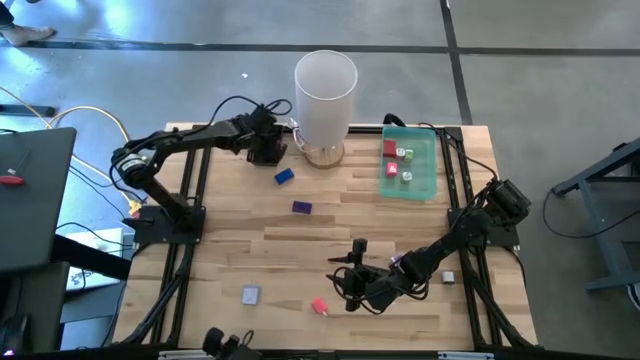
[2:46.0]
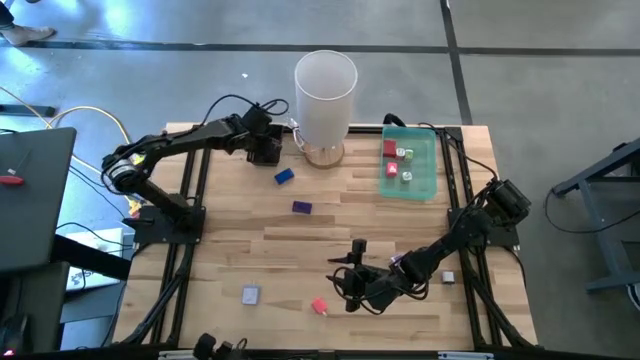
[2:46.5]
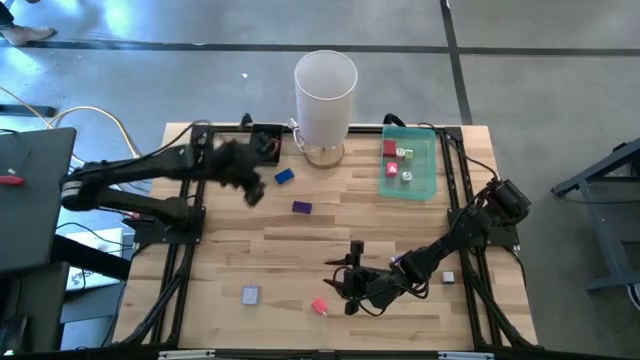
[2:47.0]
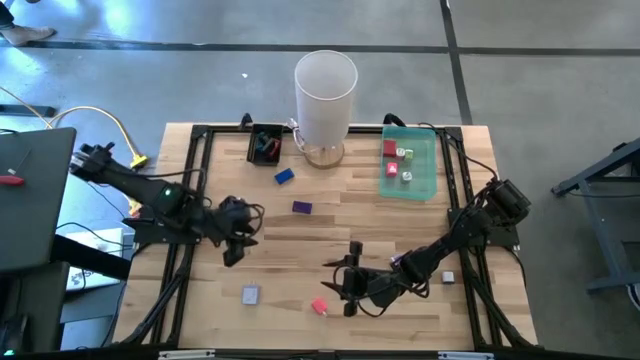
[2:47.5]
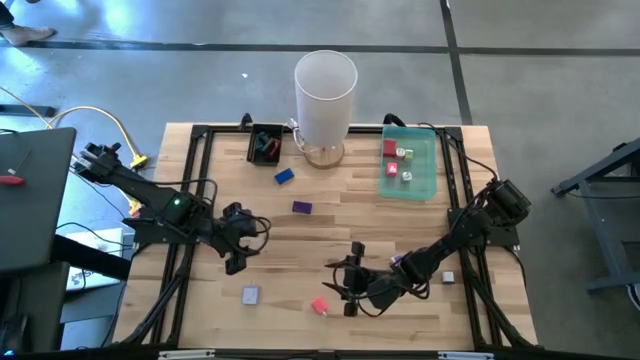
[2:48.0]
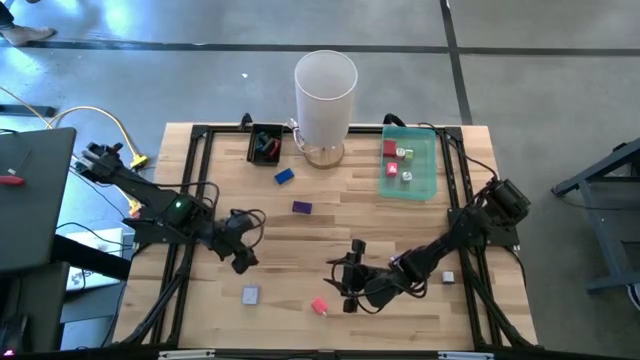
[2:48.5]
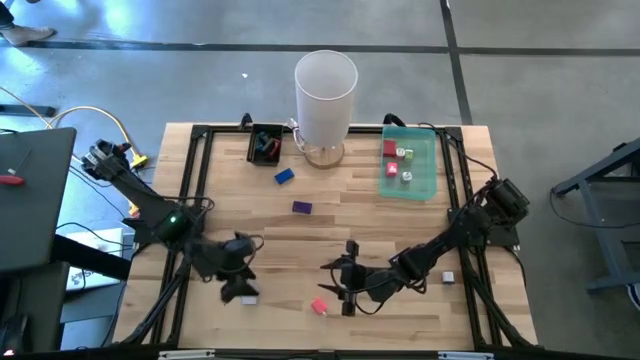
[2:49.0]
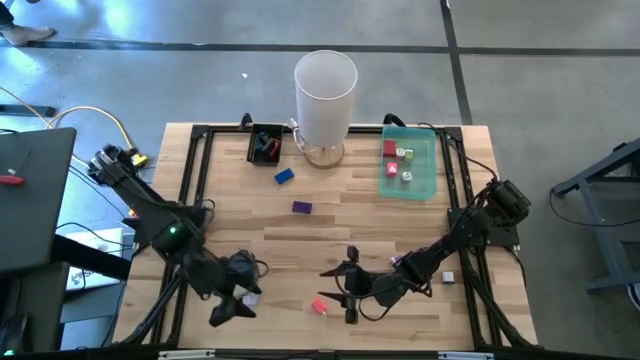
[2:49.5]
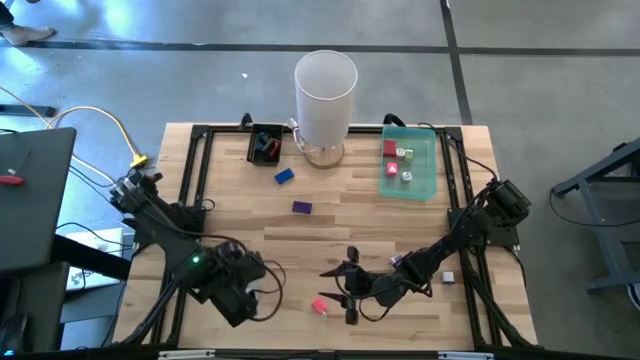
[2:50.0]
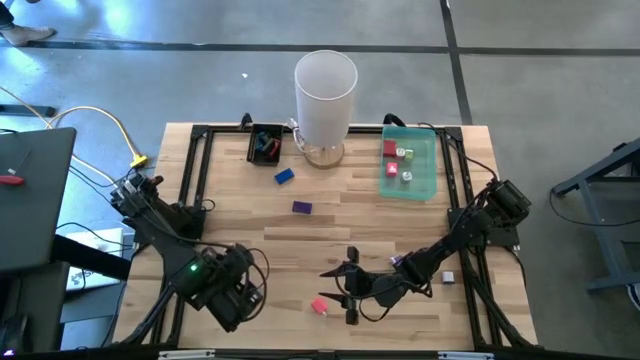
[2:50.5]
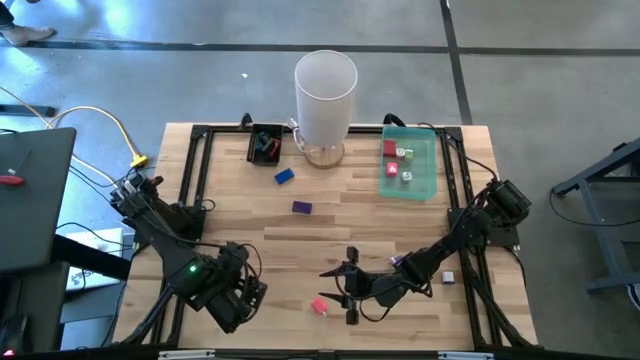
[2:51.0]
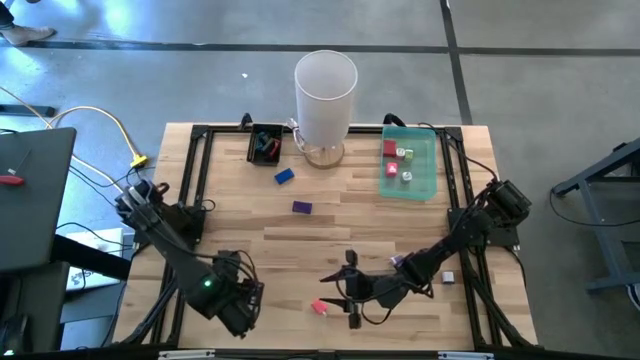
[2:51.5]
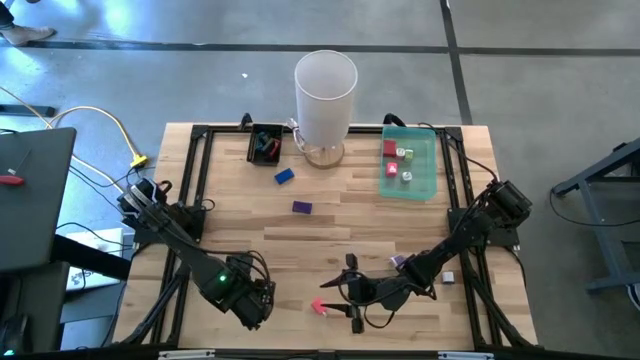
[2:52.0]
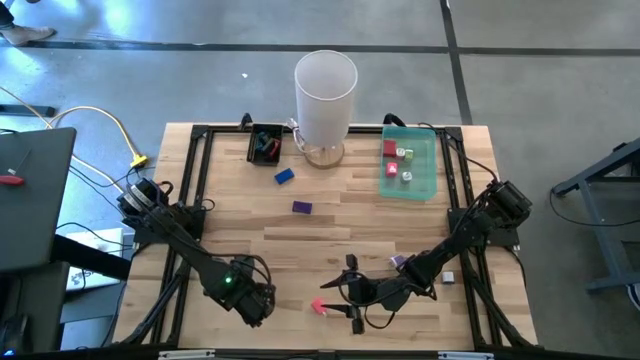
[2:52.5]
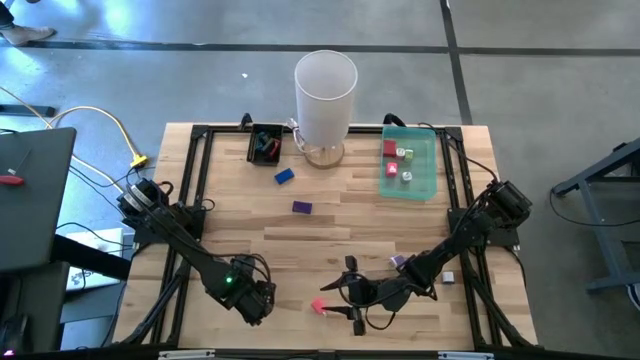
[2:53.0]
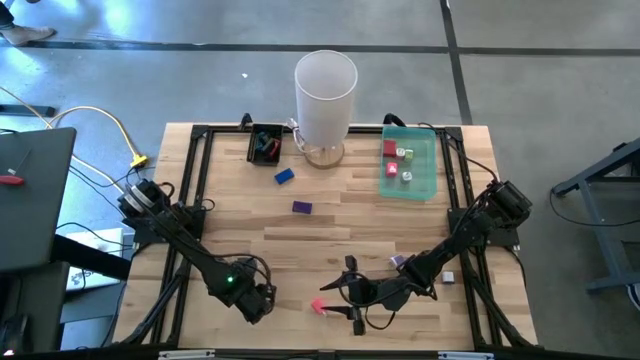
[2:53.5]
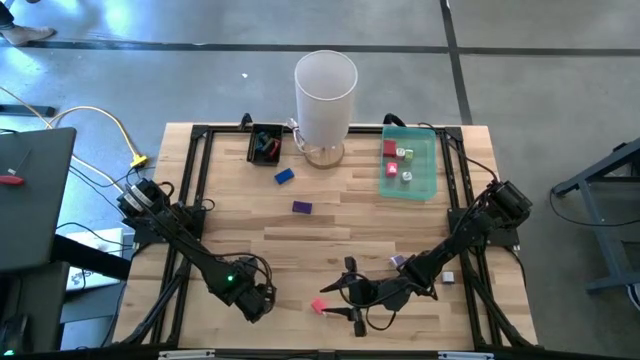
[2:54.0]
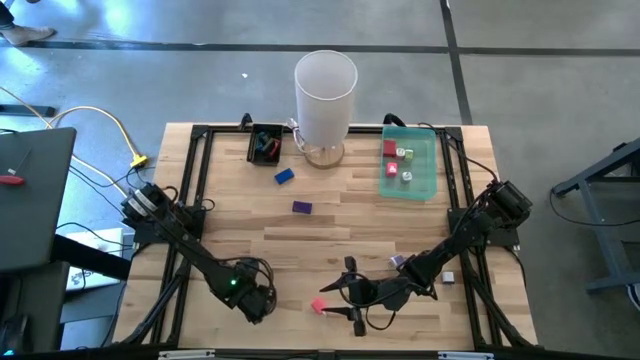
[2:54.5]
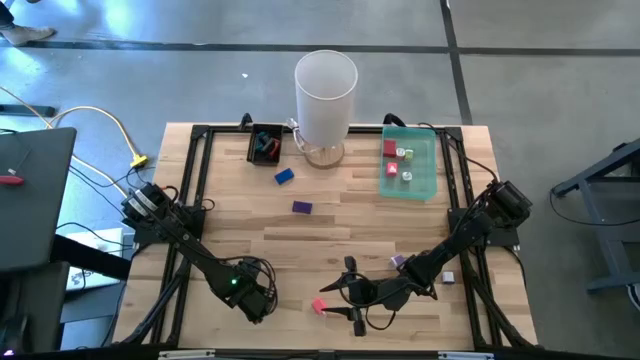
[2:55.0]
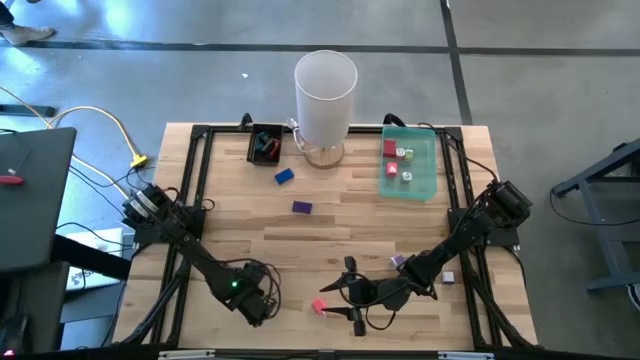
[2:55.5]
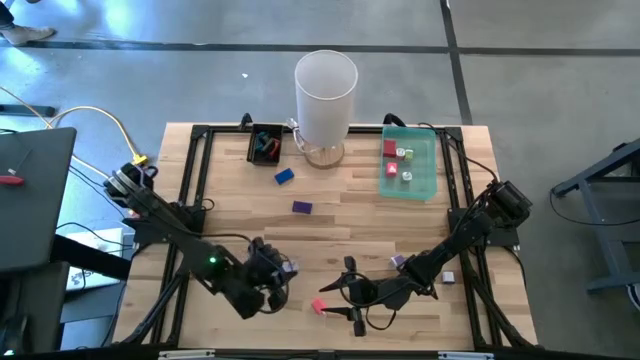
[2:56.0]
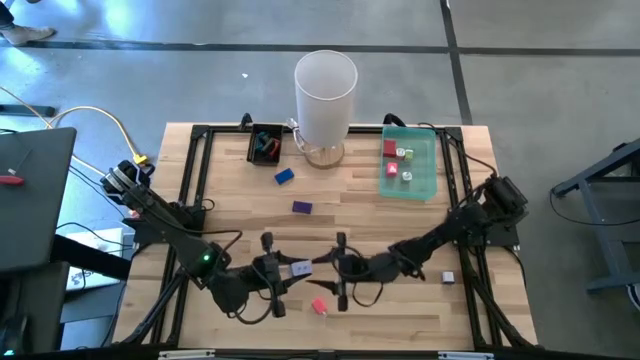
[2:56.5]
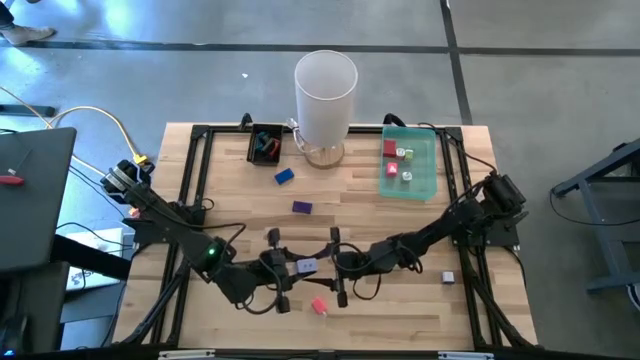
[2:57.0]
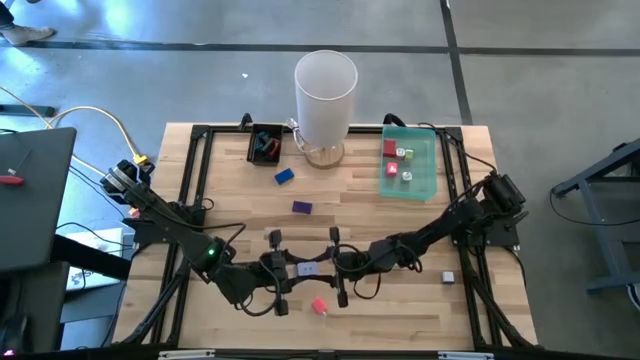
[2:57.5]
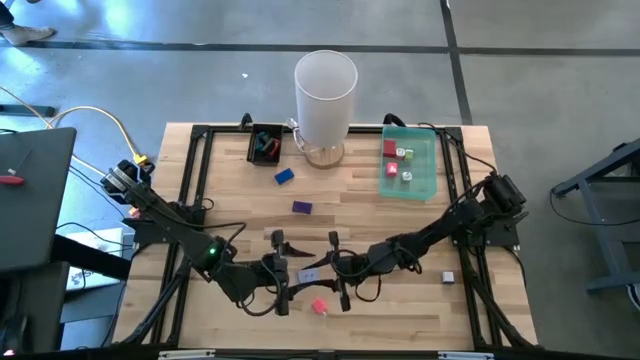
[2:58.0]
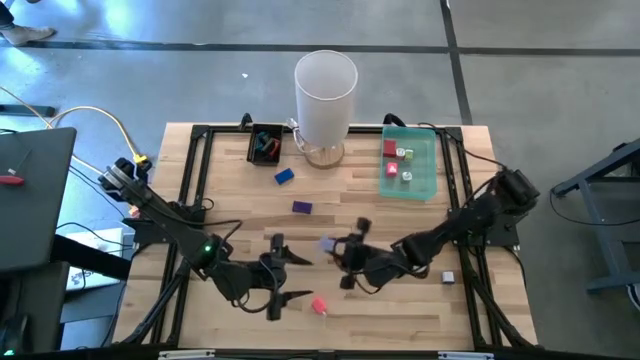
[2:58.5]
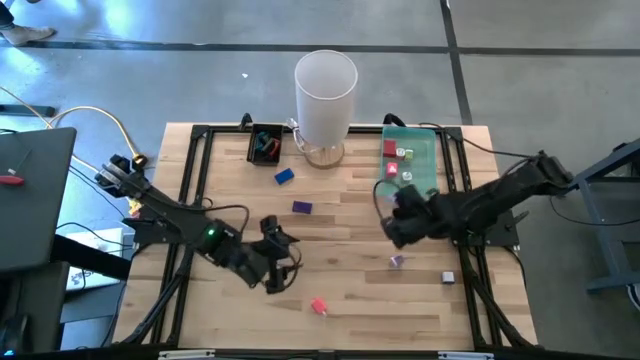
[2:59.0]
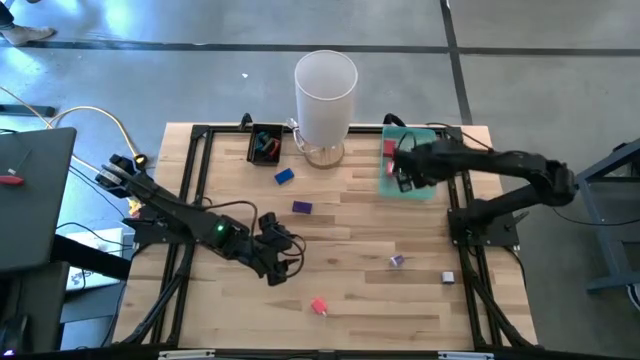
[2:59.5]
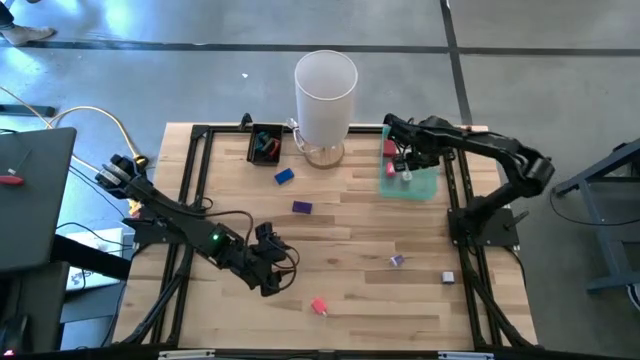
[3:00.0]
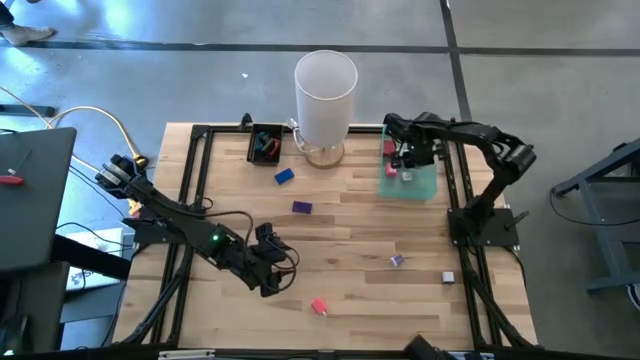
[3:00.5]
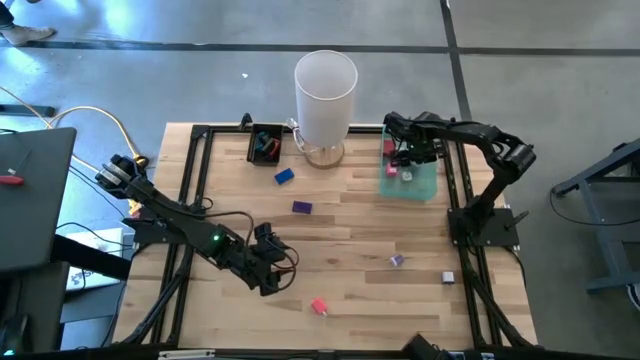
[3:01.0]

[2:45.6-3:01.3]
Task: Pick & Place Office items
Put the blue adapter into the green bin

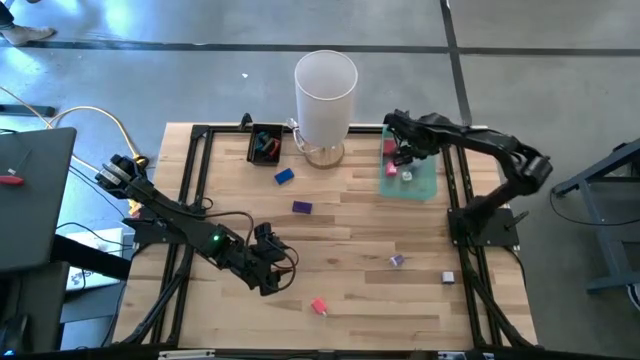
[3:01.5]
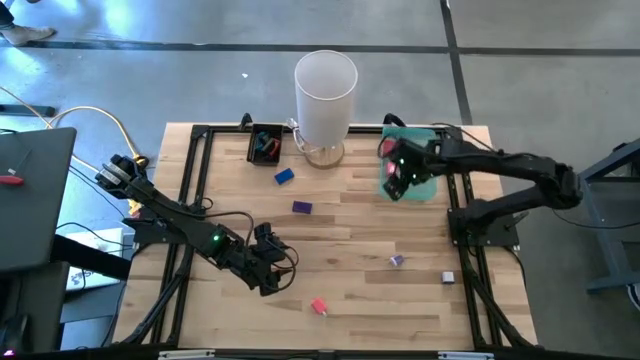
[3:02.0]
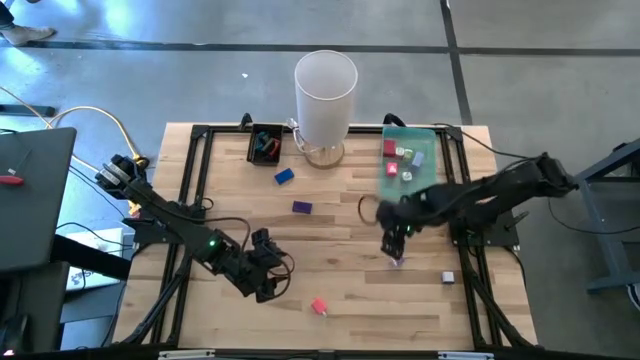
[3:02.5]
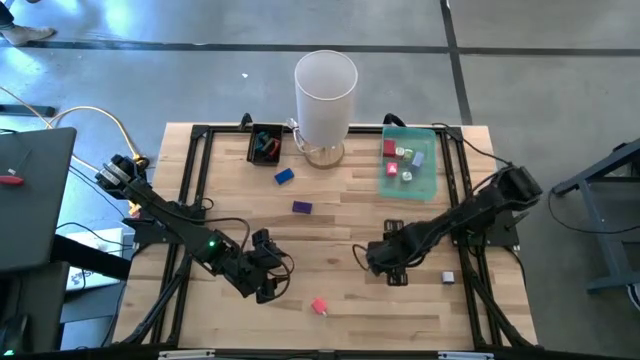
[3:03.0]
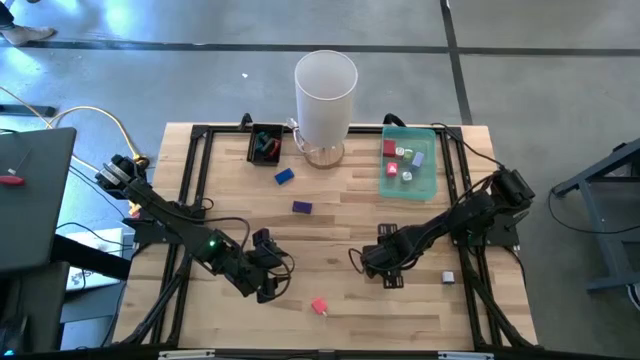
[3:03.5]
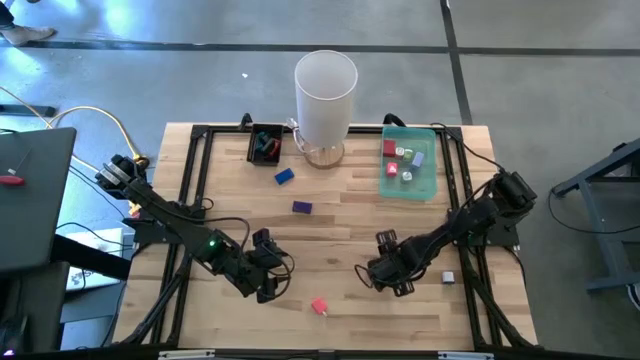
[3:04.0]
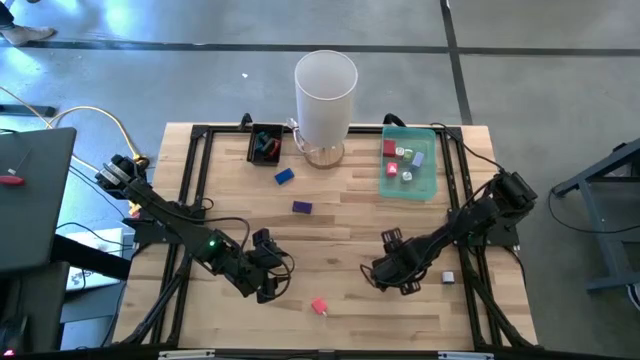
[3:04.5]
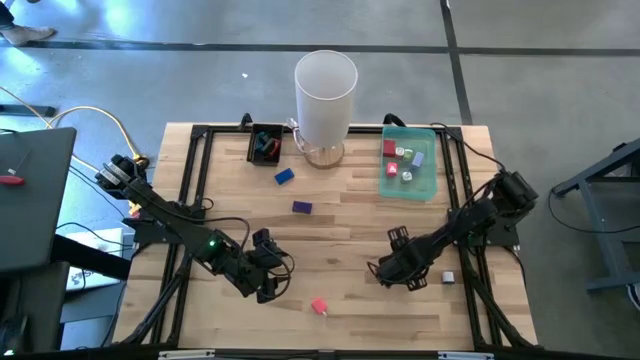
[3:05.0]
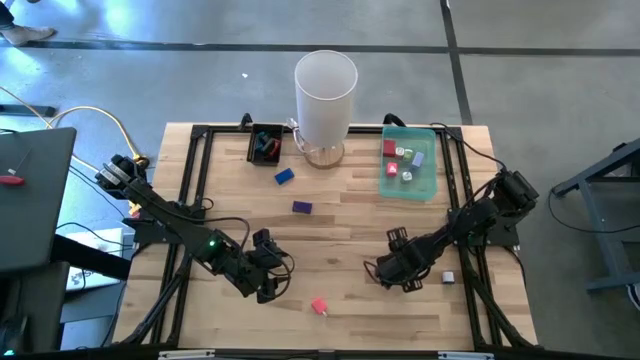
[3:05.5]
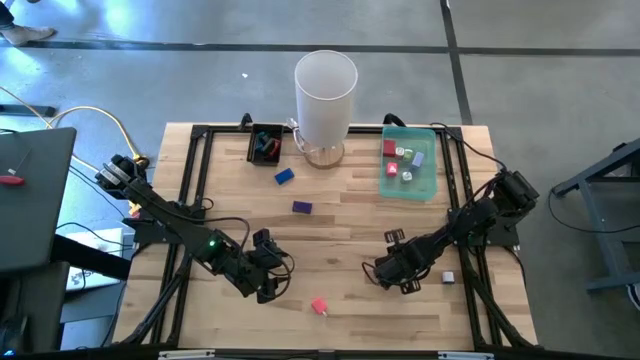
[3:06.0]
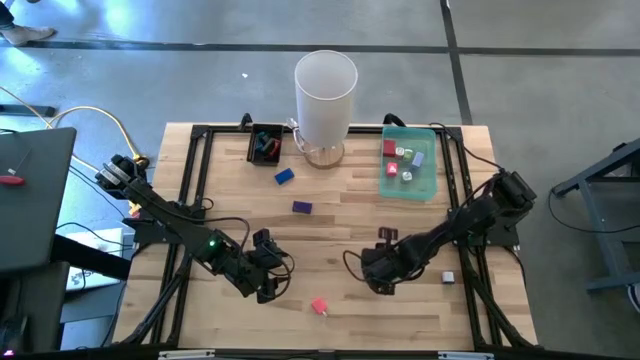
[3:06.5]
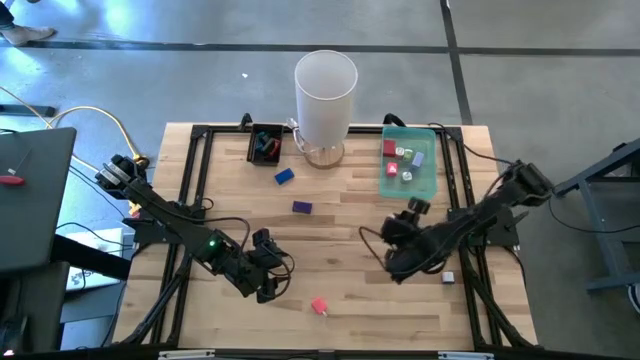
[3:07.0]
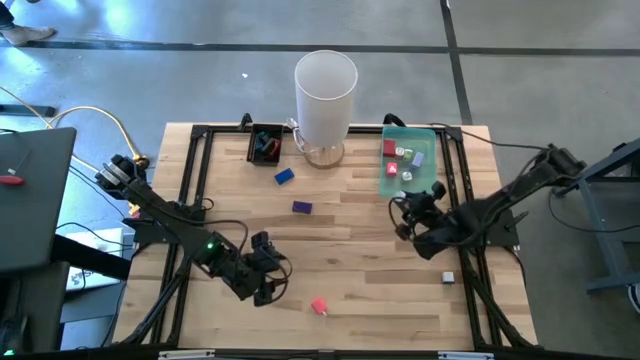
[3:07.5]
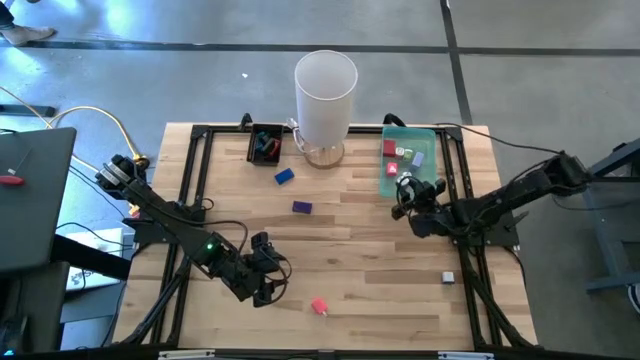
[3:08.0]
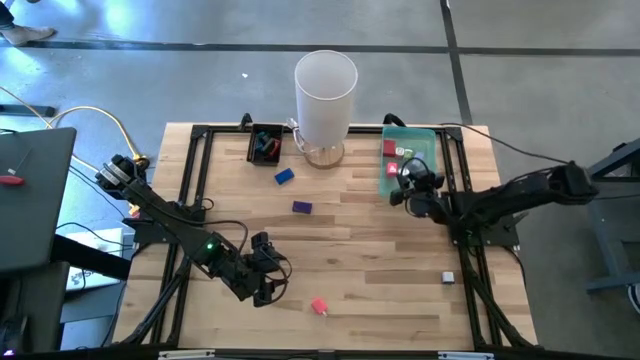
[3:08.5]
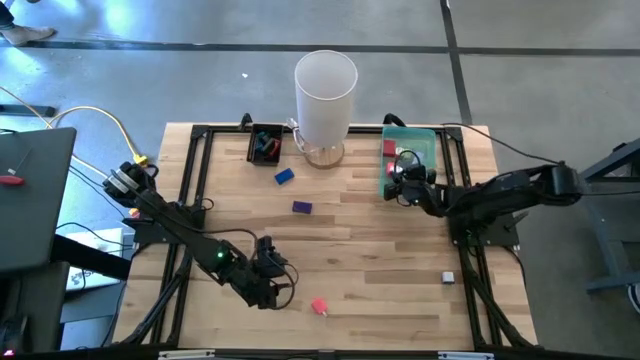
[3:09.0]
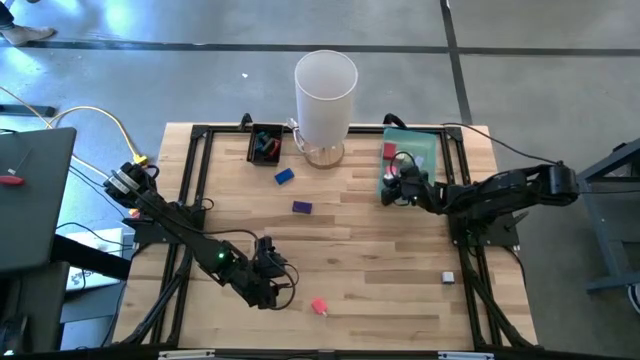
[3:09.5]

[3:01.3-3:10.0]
Put the blue white adapter into the green bin
